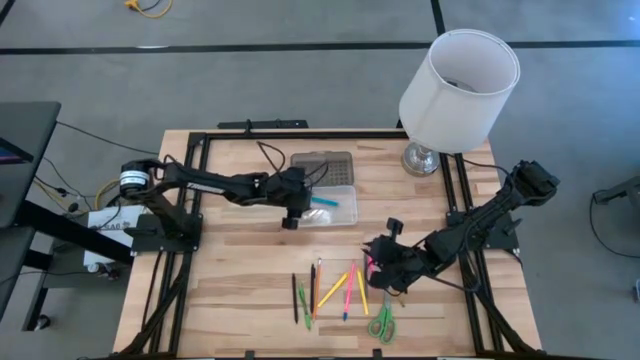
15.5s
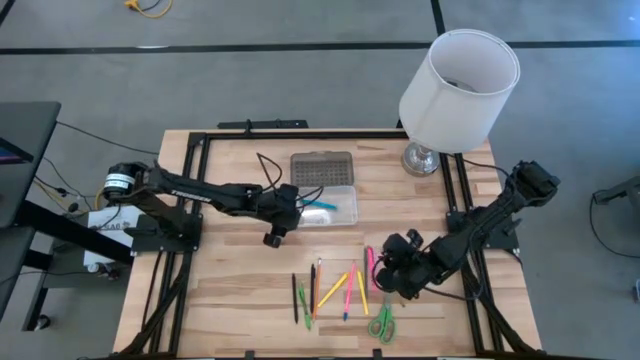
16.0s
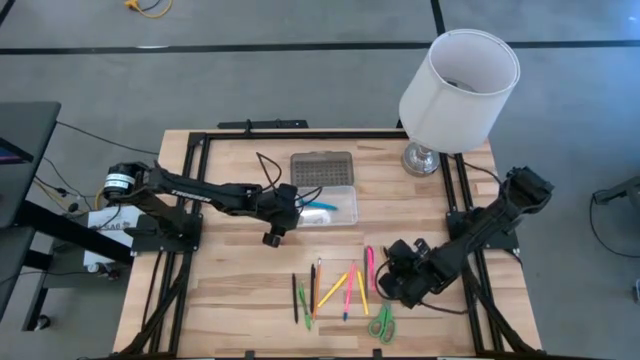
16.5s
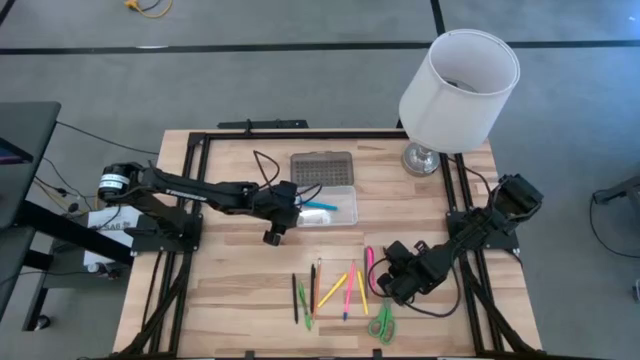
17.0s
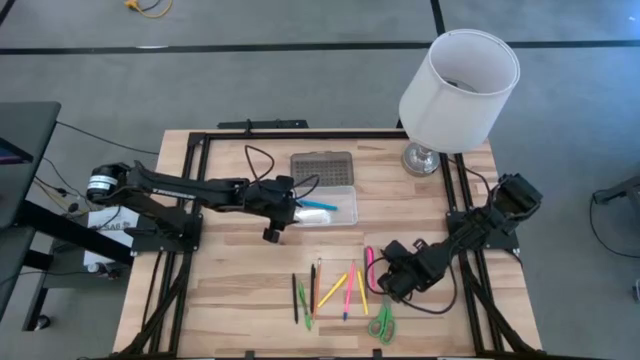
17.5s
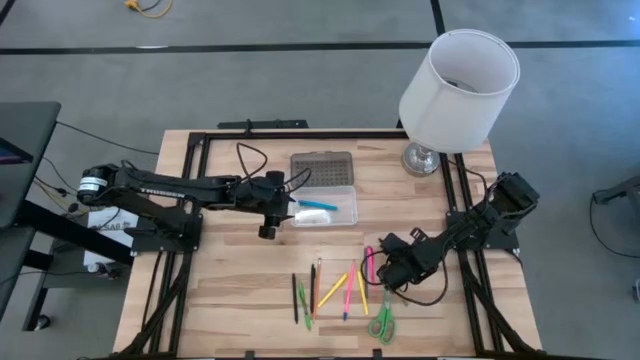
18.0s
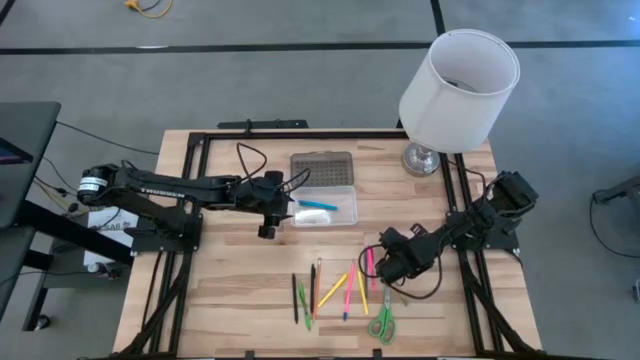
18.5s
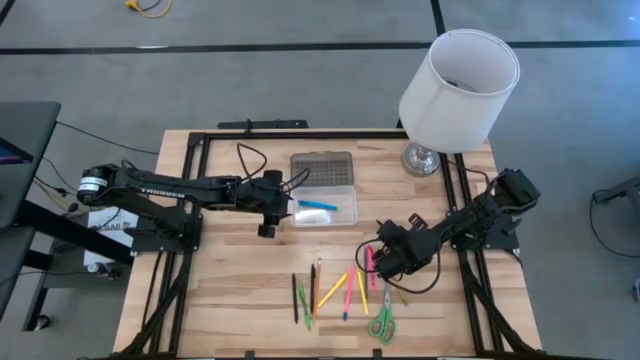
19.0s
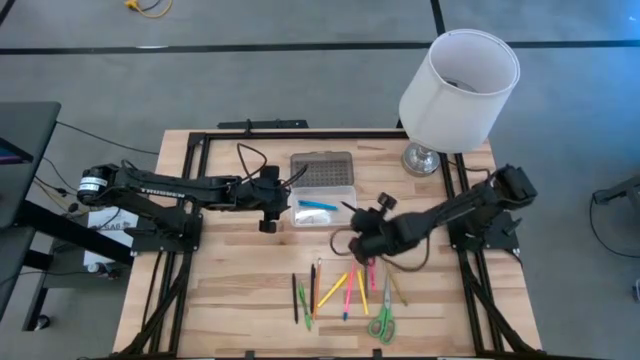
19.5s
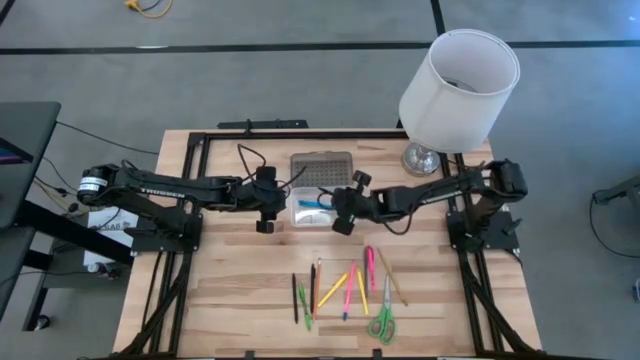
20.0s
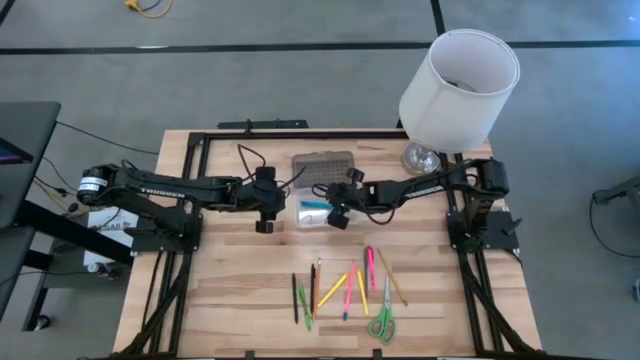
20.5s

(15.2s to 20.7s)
Task: Pick & place school supplies into a supply box
Put the right black pen into the gray supply box

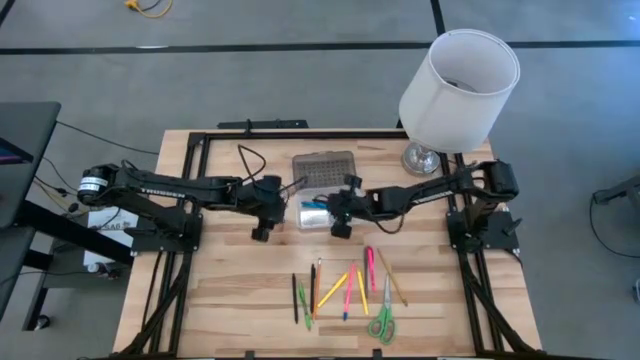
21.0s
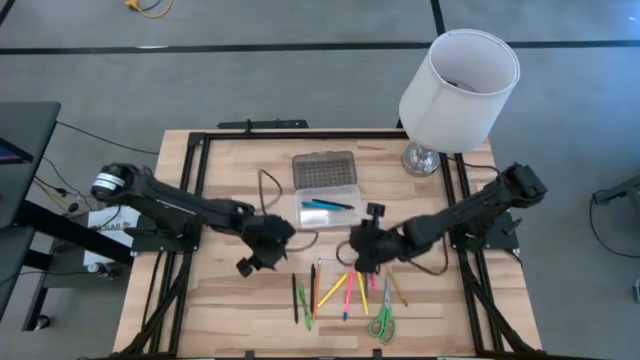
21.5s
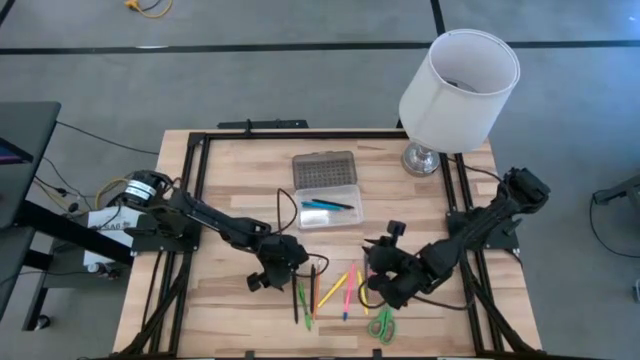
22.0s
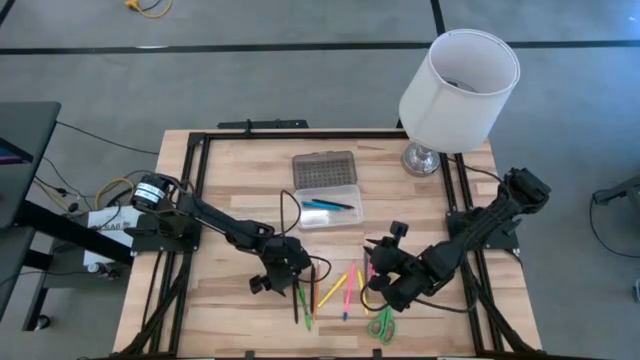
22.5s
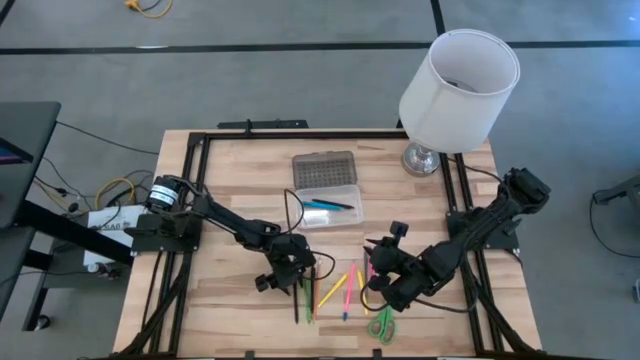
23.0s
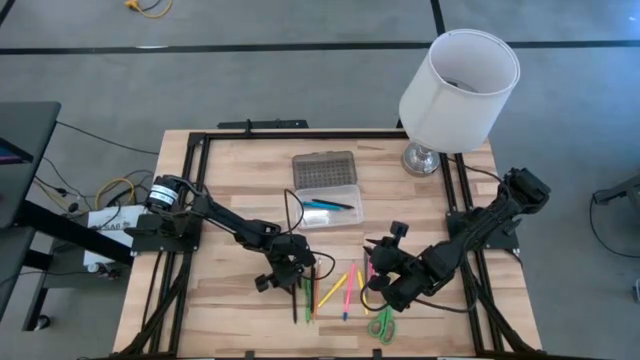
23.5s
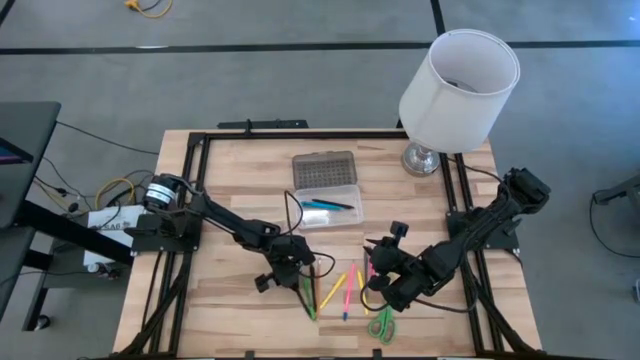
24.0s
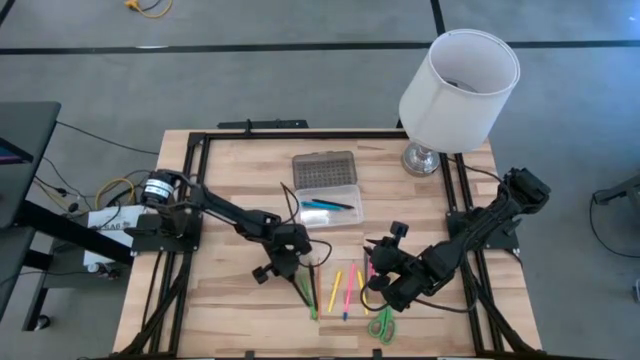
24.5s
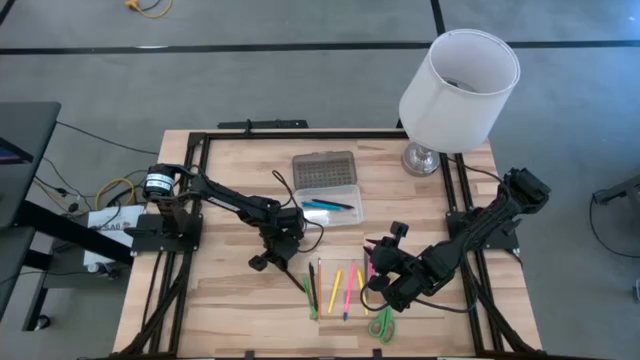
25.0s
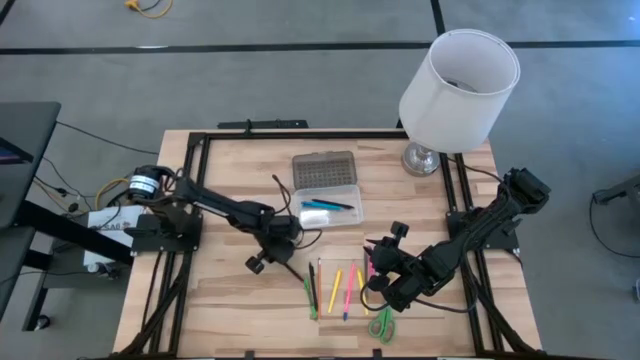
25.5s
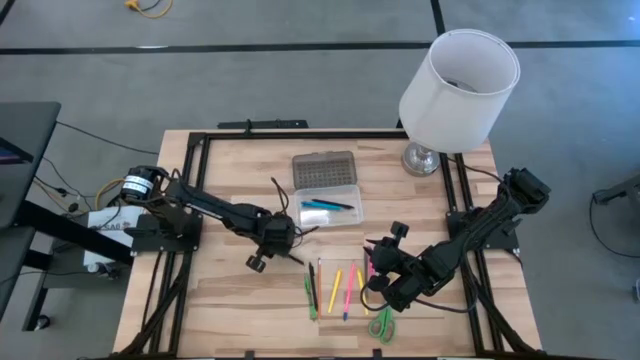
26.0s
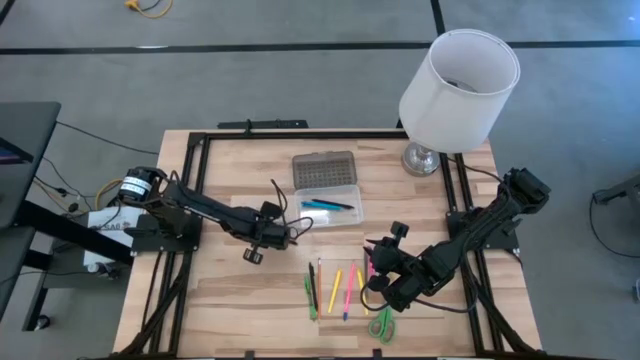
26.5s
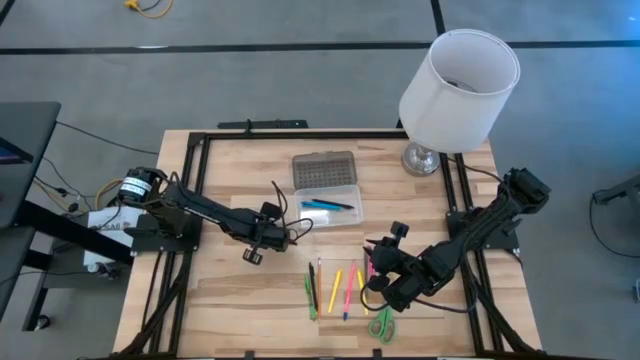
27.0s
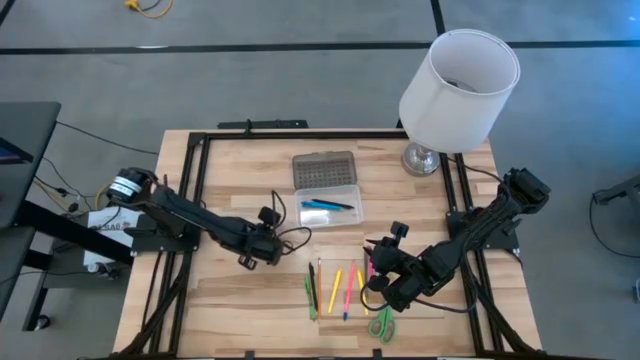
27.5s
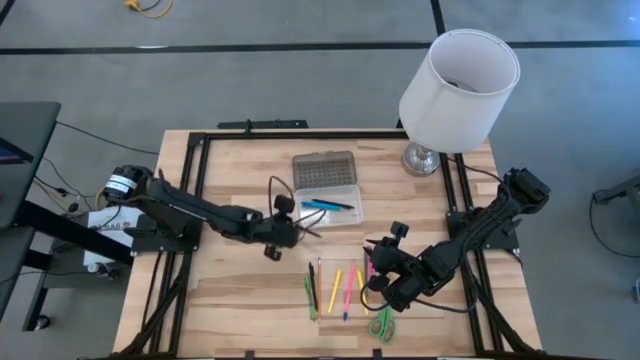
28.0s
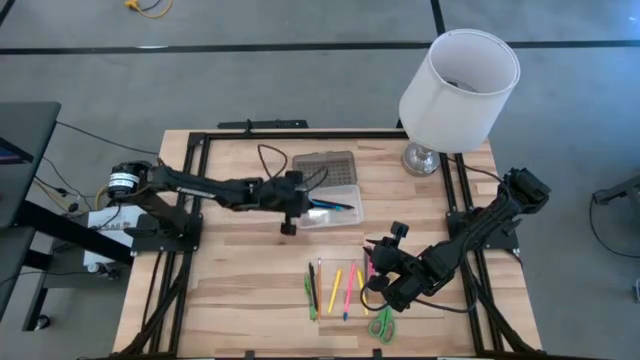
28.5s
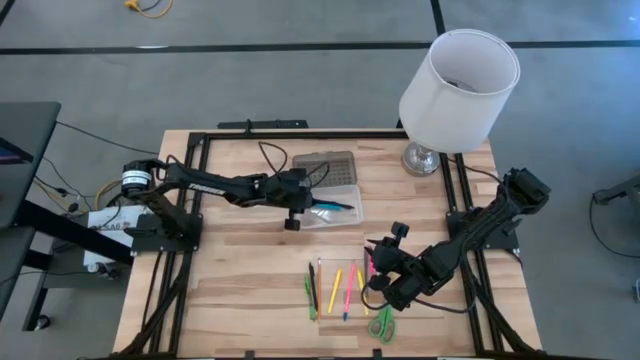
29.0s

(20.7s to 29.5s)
Put the left black pen into the gray supply box

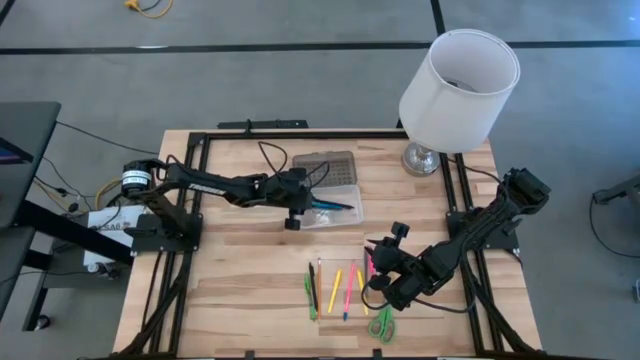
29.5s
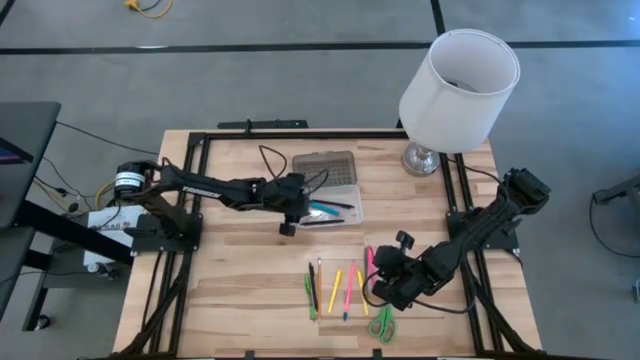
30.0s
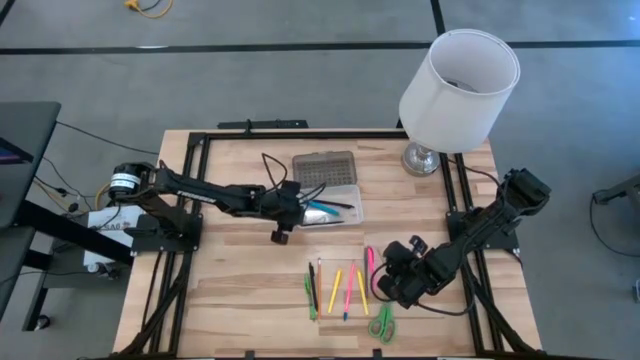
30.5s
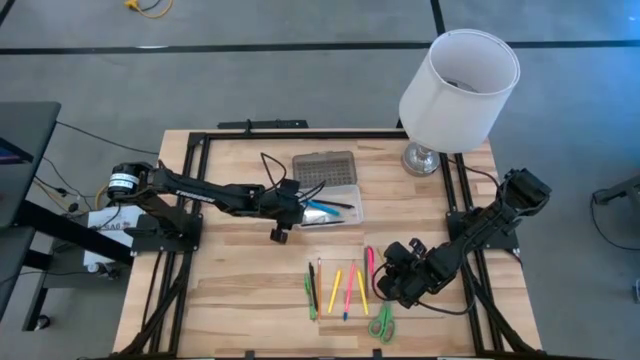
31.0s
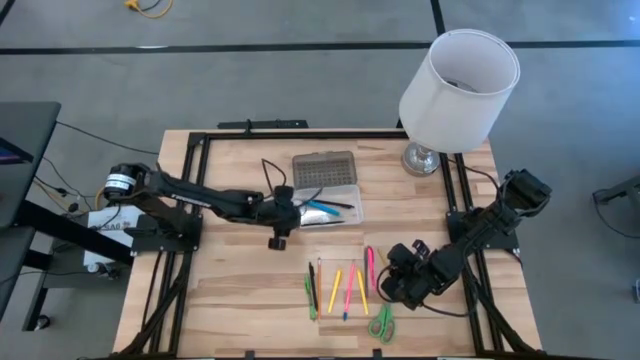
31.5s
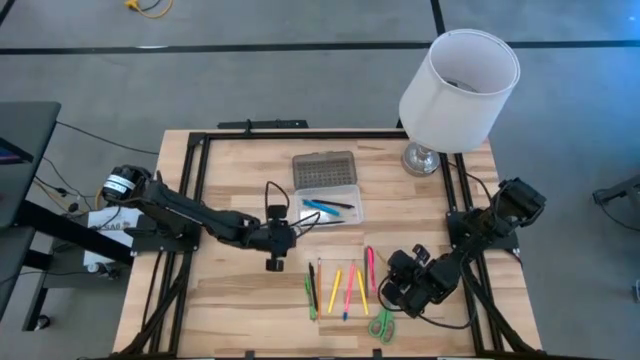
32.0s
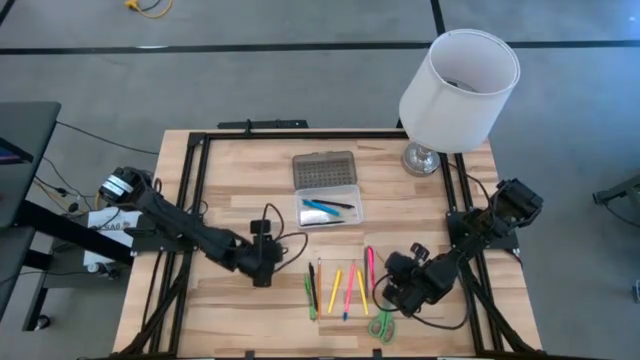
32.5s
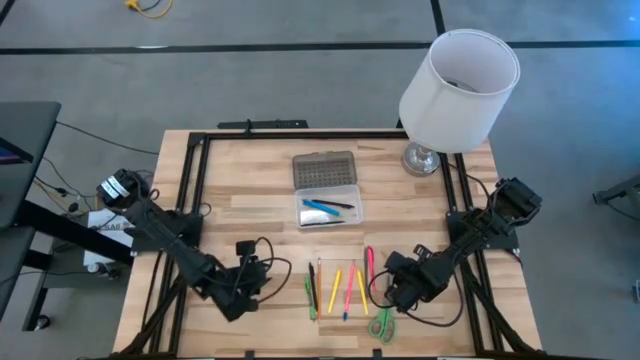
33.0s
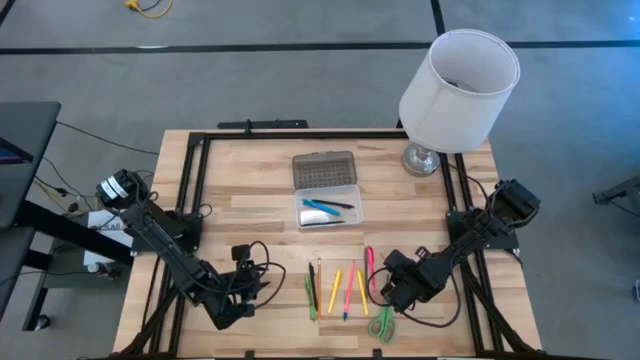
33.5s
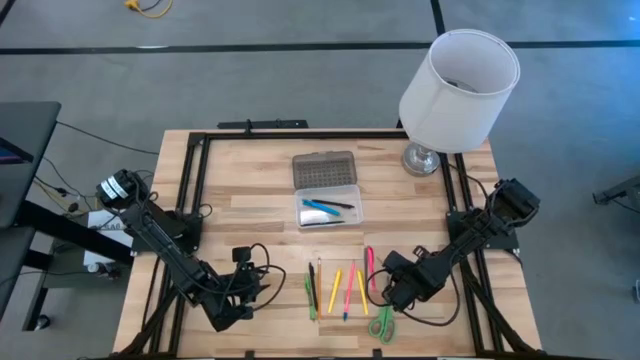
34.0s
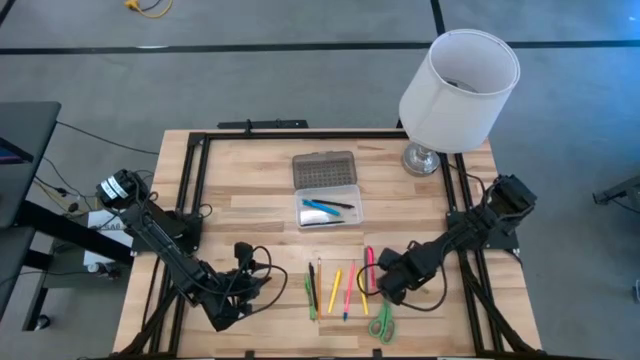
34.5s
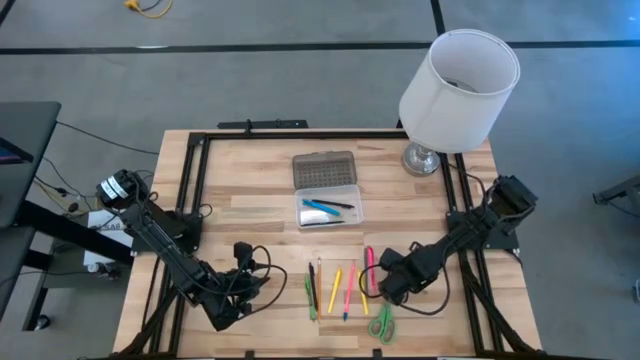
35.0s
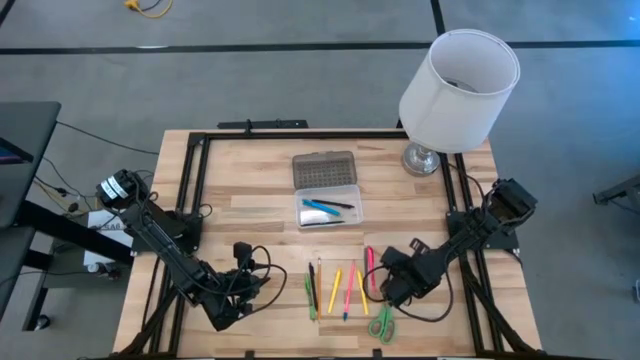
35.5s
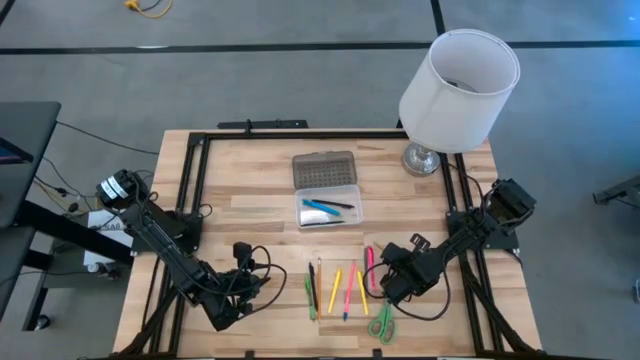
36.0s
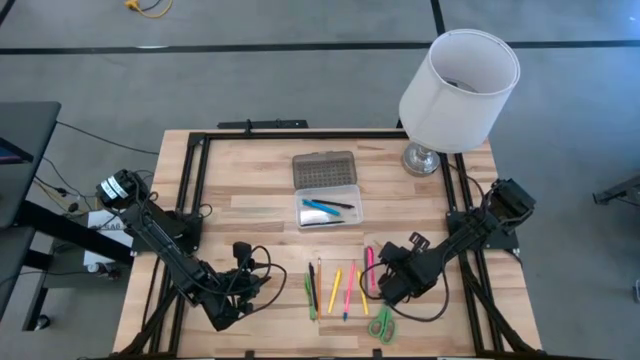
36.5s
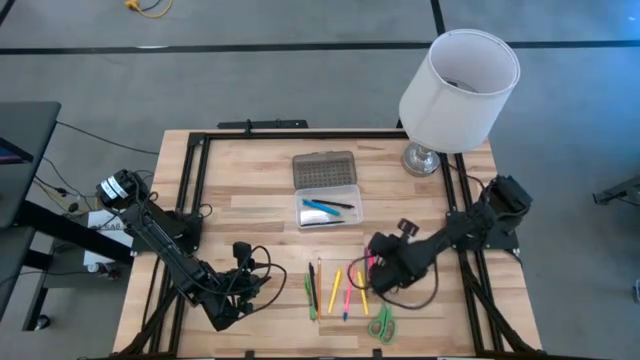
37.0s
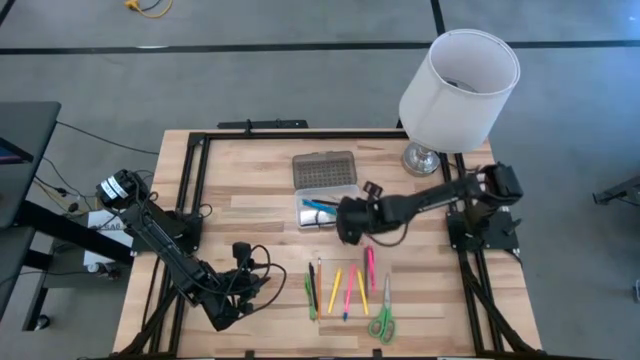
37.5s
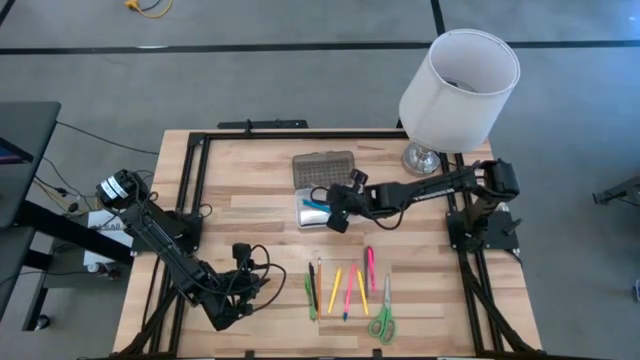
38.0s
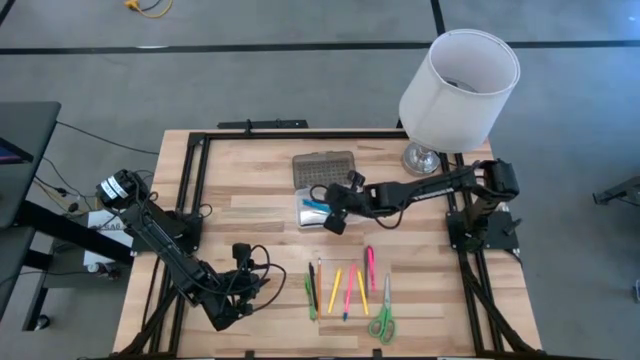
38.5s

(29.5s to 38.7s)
Put the yellow pencil into the gray supply box
